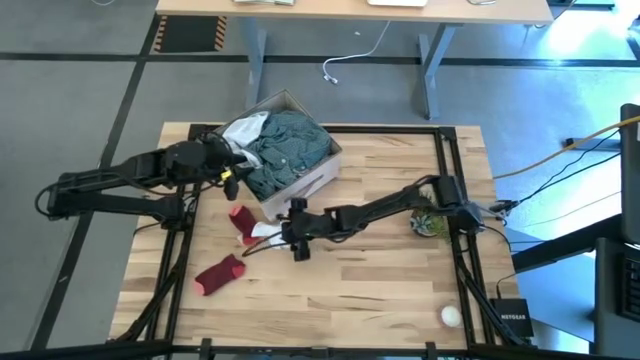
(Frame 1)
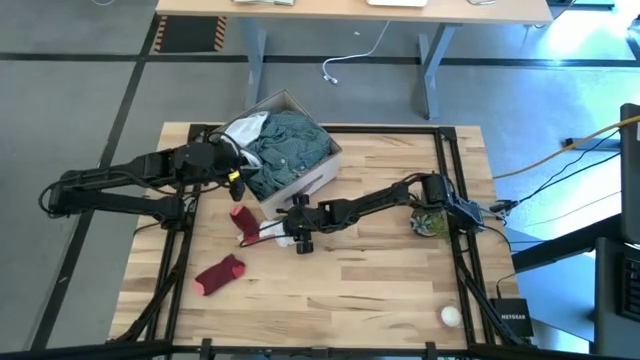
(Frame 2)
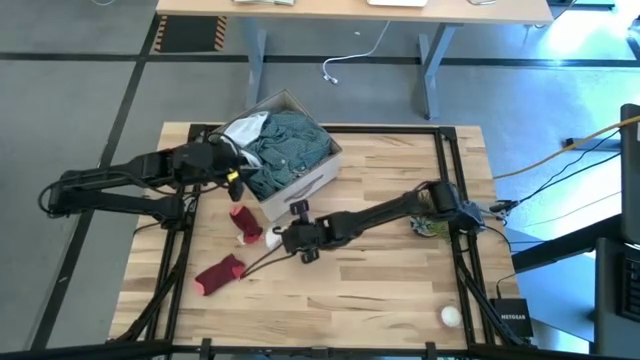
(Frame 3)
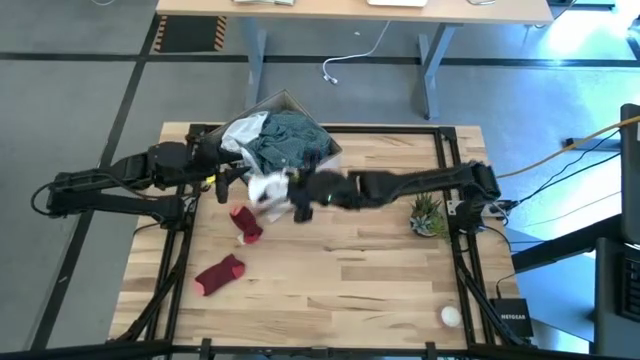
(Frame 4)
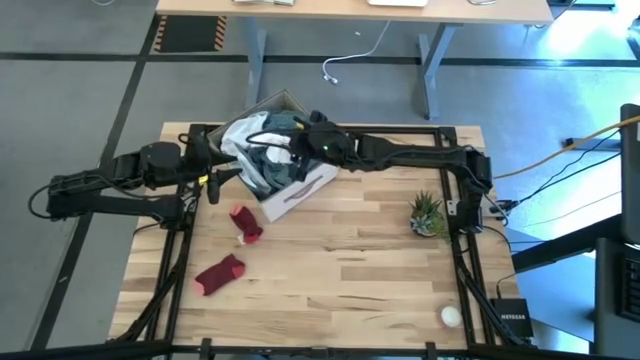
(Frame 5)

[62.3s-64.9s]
Task: Sort clothes
Put the white sock into the laundry organizer

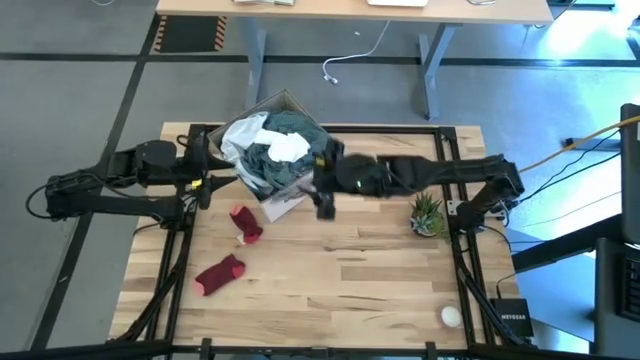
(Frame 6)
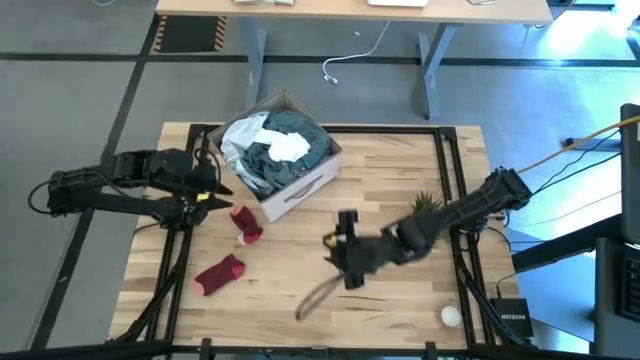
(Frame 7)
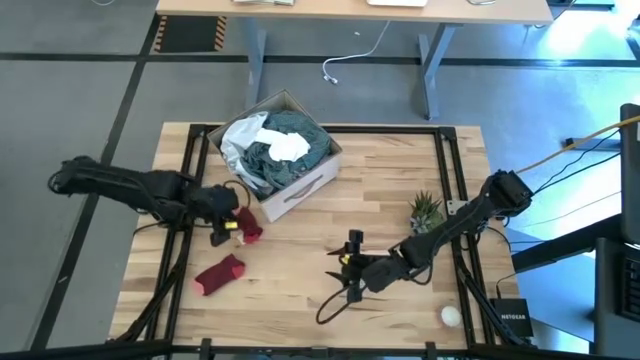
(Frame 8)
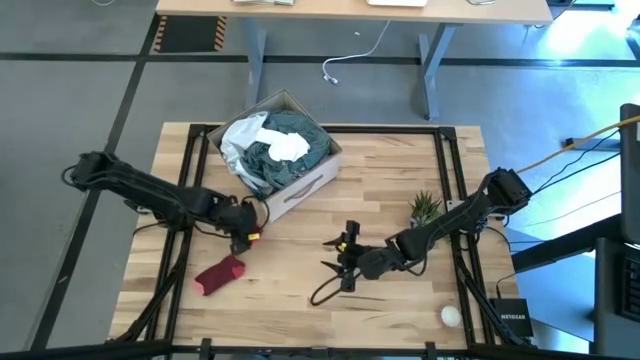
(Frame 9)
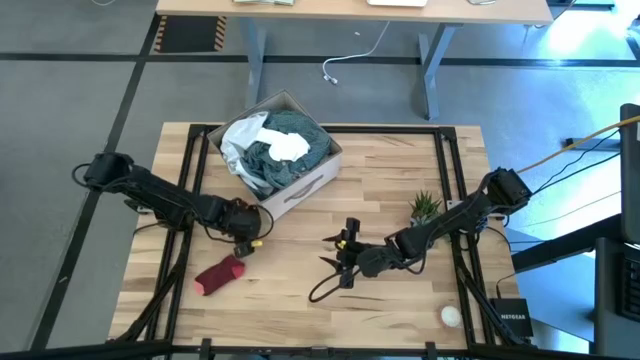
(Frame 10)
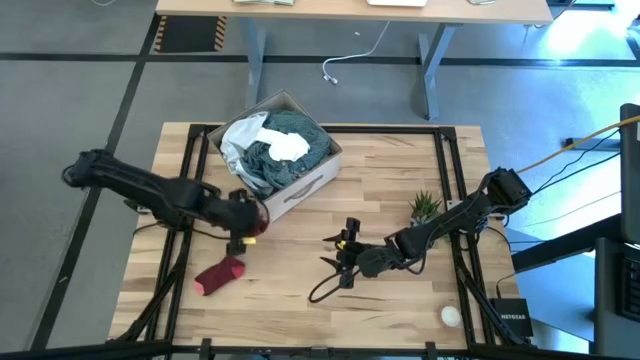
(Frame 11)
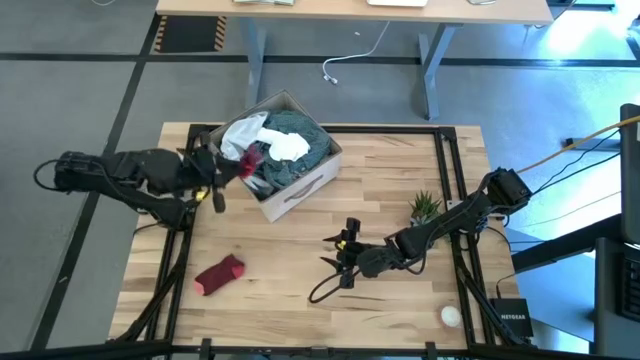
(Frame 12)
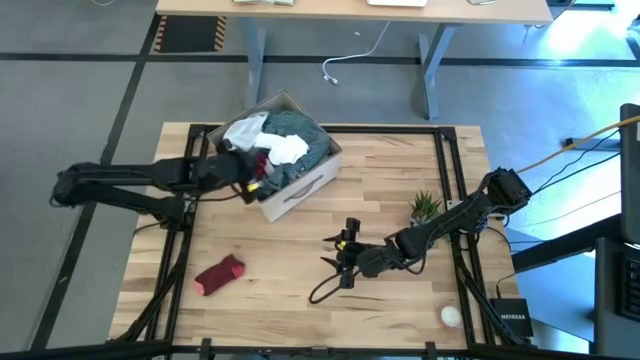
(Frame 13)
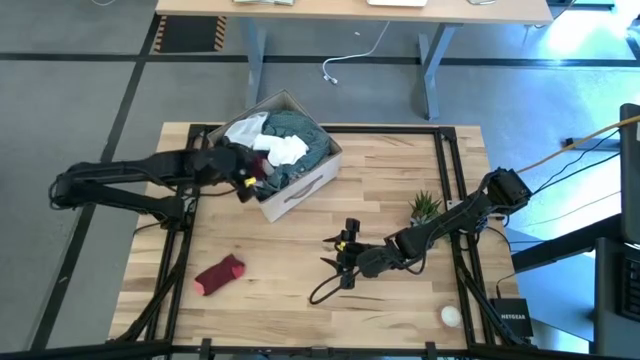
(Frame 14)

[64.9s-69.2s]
Put the top red sock into the laundry organizer

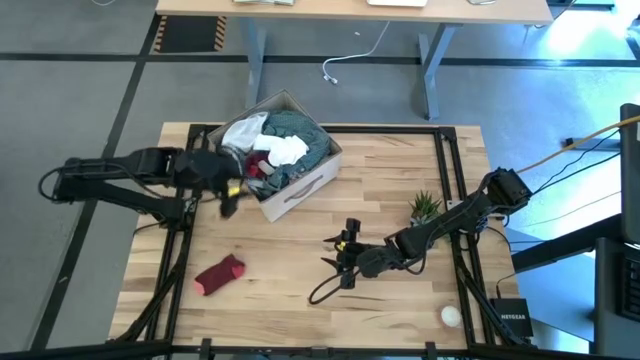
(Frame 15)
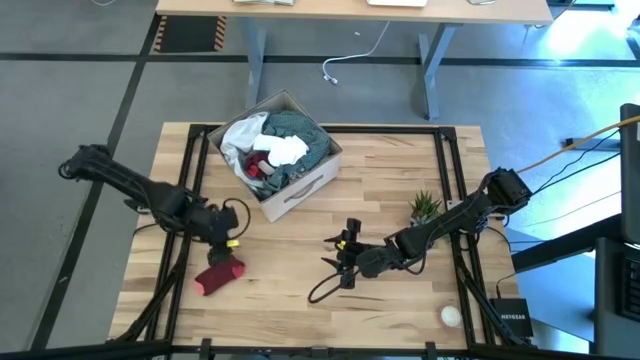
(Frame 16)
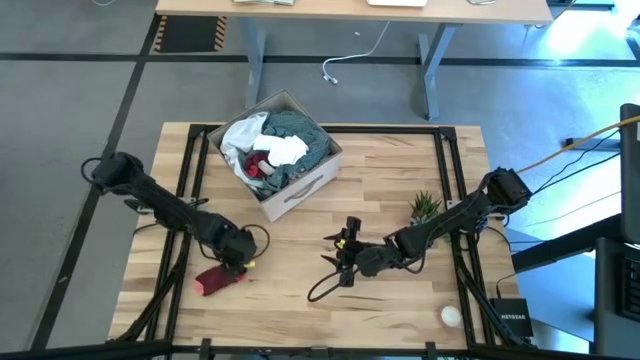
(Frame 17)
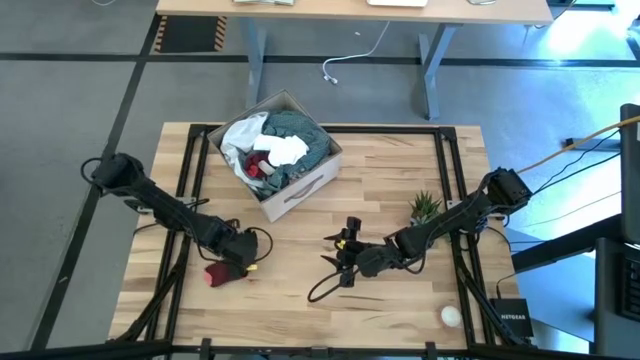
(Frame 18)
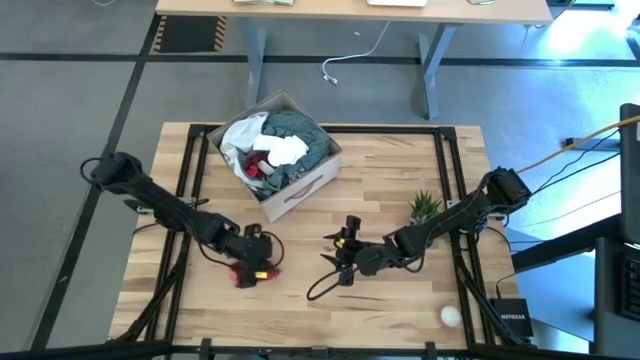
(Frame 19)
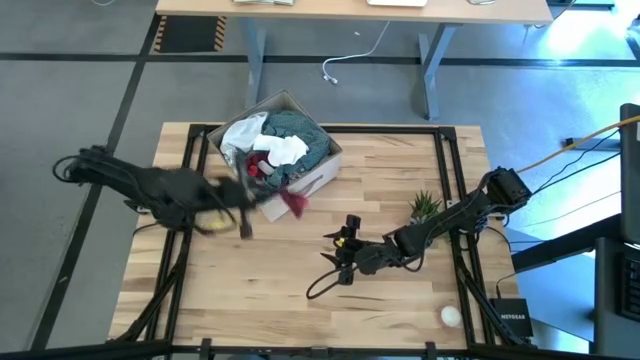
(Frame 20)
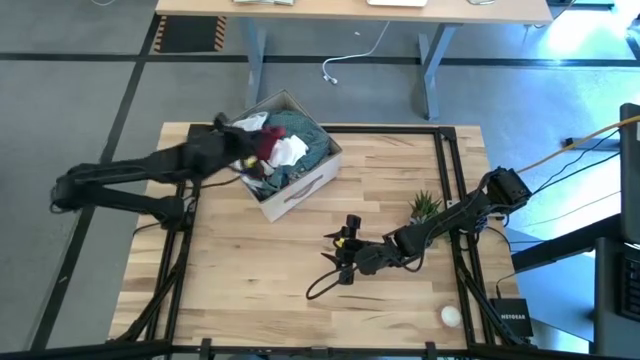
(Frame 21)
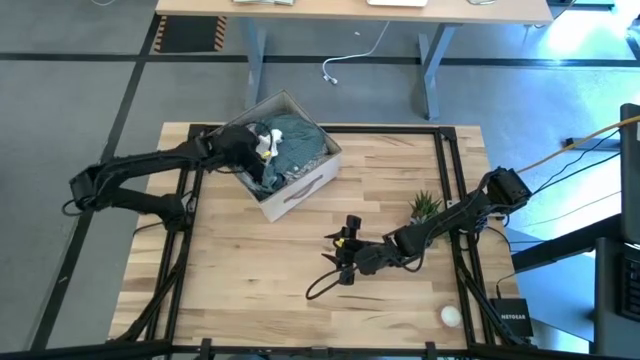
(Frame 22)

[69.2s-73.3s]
Put the red sock into the laundry organizer

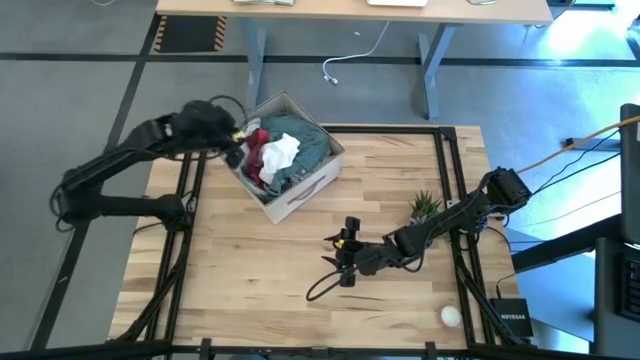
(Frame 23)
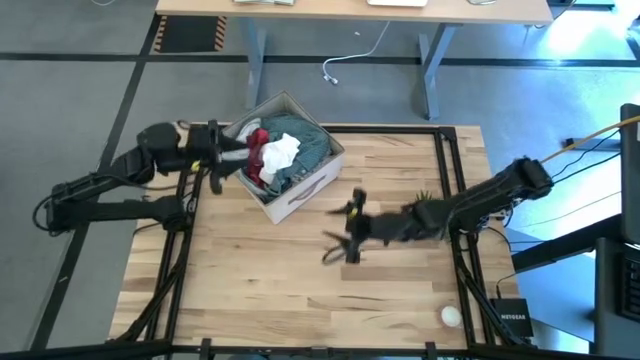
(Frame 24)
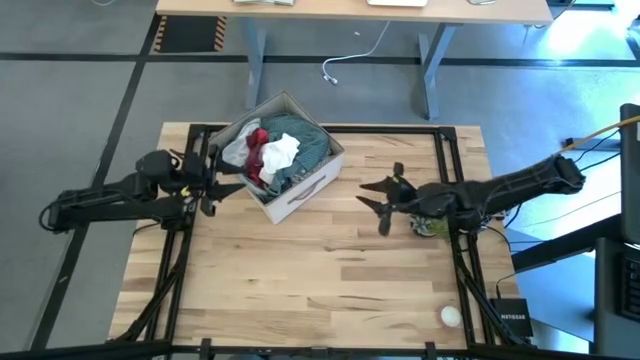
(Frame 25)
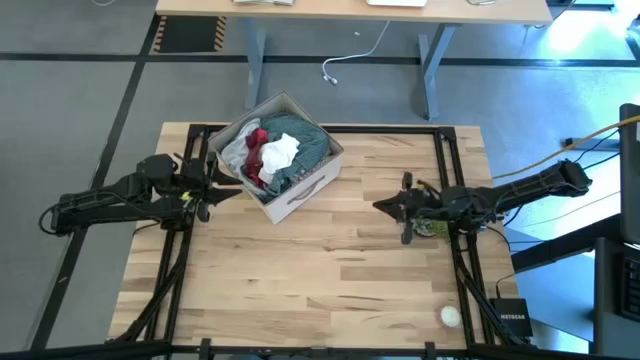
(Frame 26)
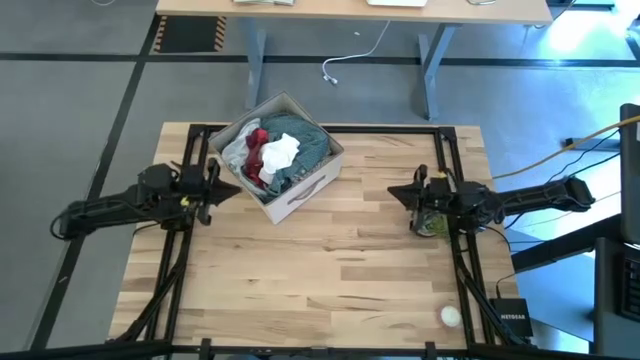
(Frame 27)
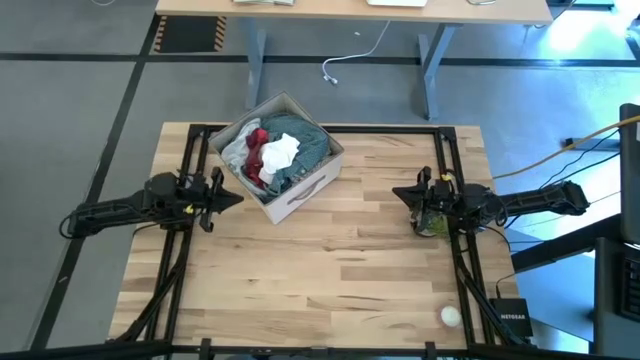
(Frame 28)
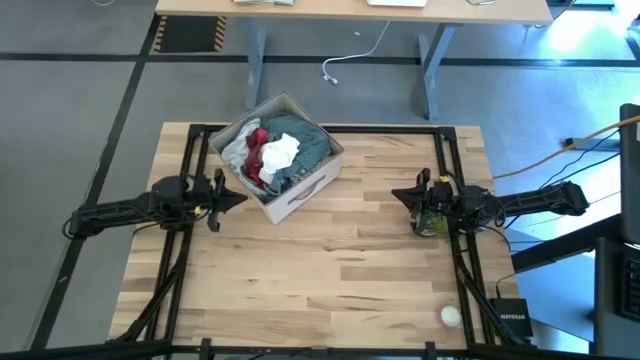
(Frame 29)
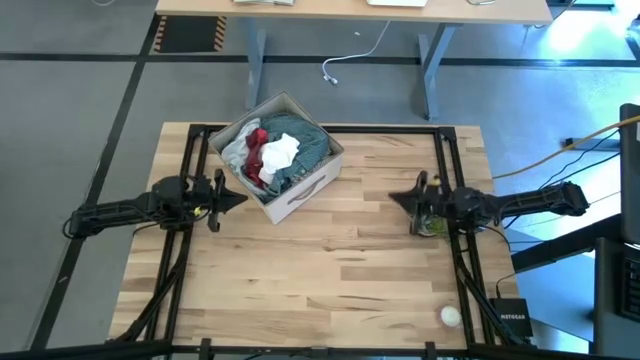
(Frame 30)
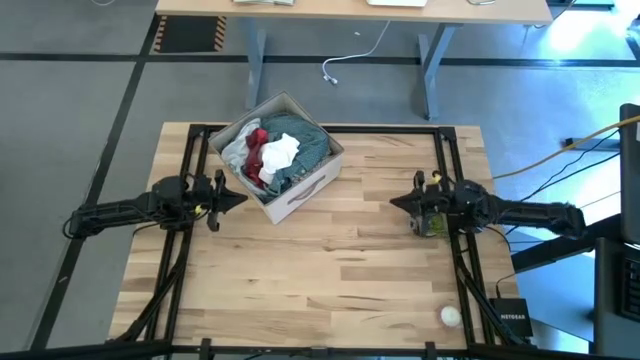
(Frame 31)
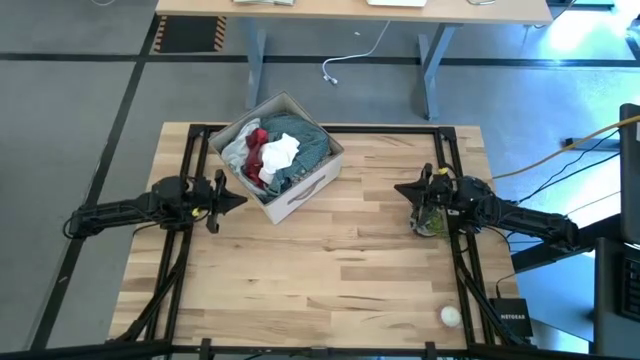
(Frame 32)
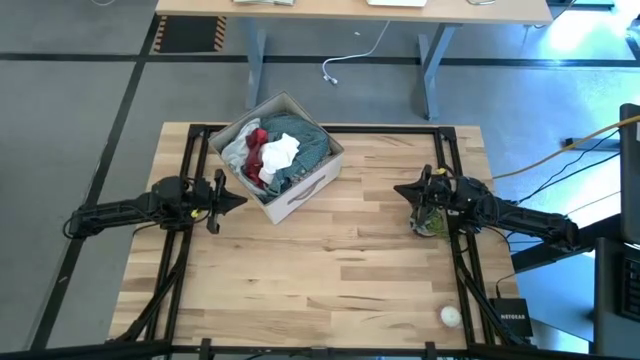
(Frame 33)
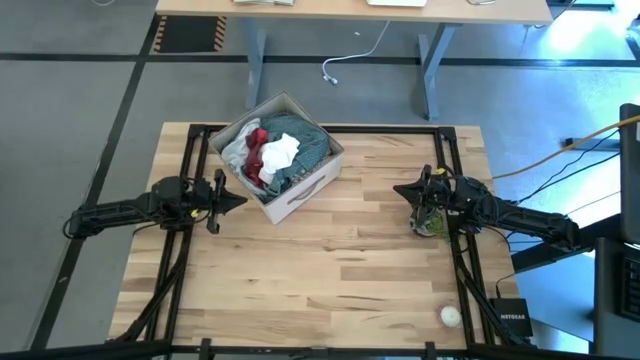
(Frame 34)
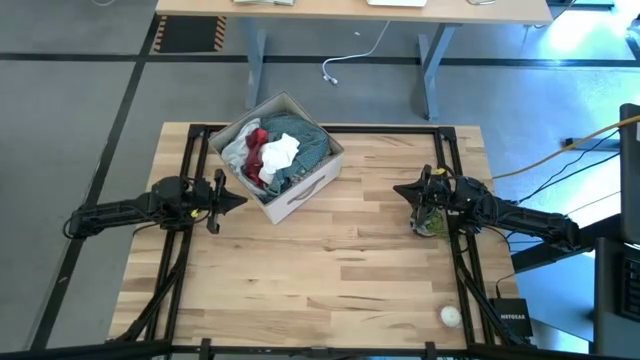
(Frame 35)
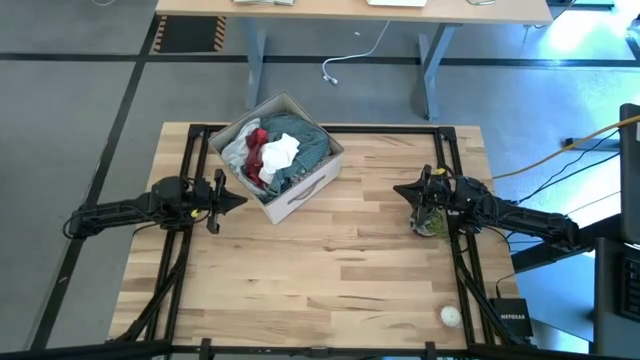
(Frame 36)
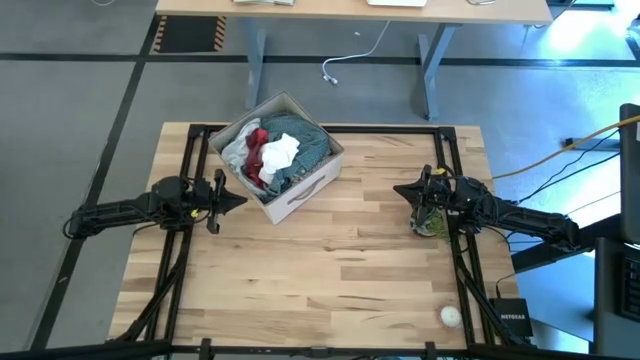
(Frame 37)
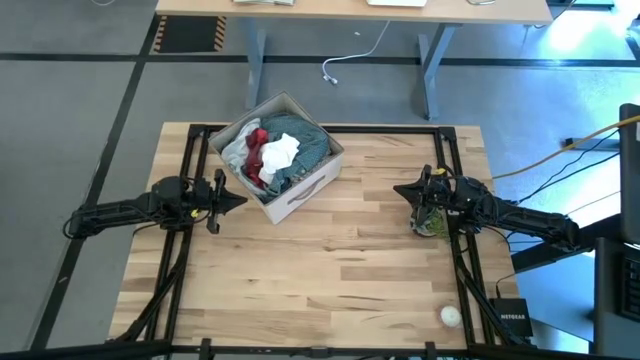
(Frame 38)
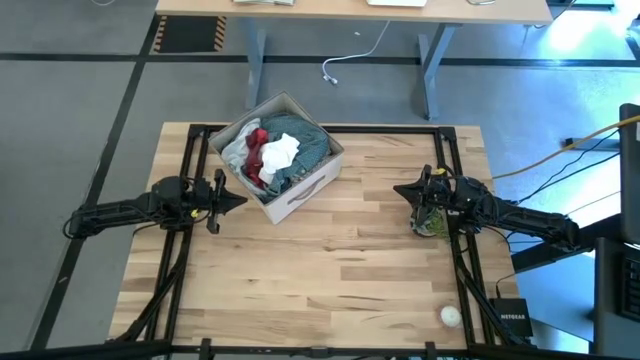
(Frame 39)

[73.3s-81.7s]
Return to Home Position

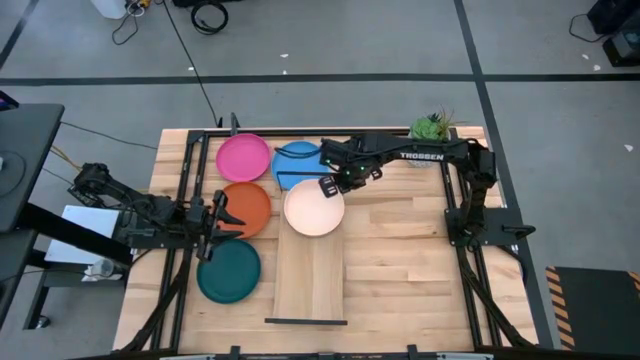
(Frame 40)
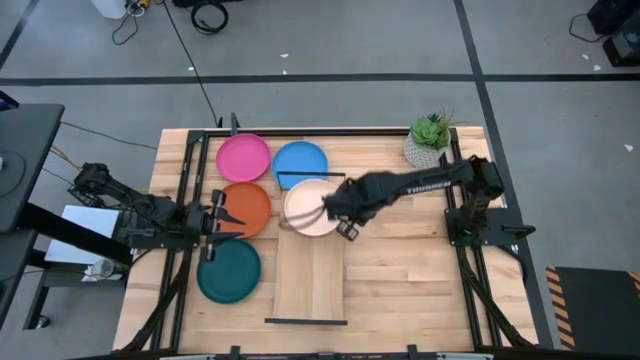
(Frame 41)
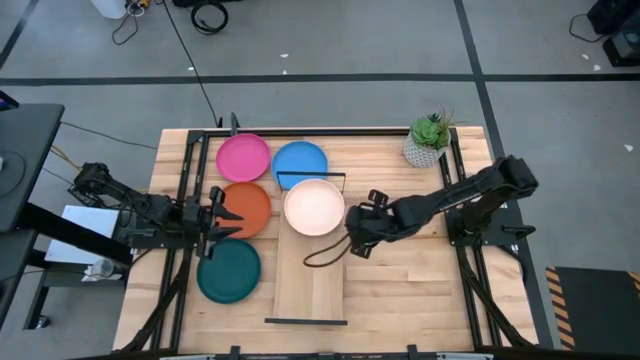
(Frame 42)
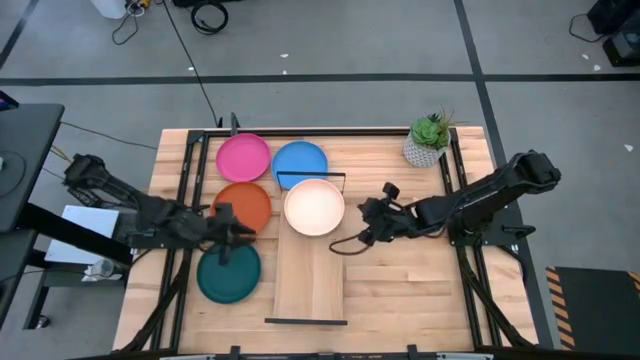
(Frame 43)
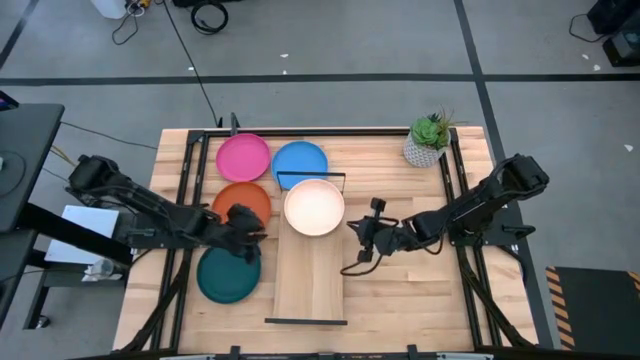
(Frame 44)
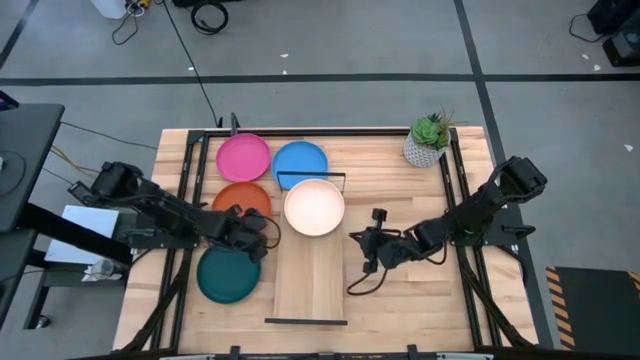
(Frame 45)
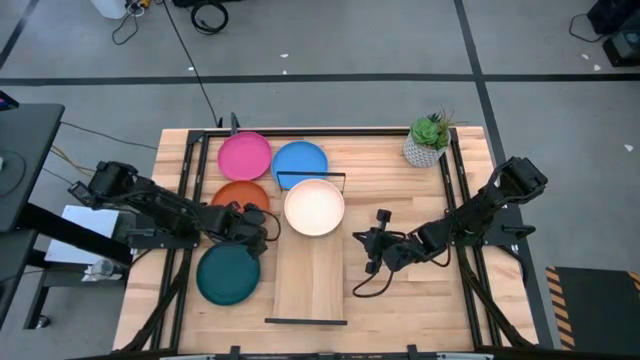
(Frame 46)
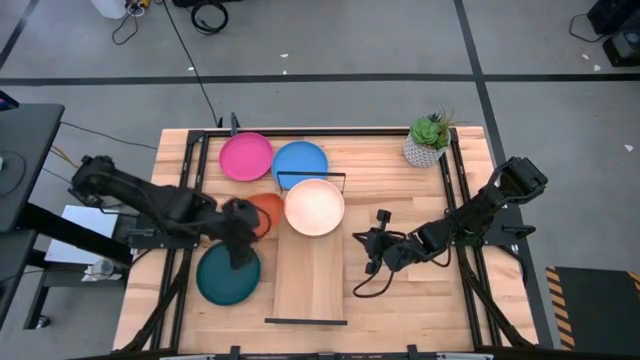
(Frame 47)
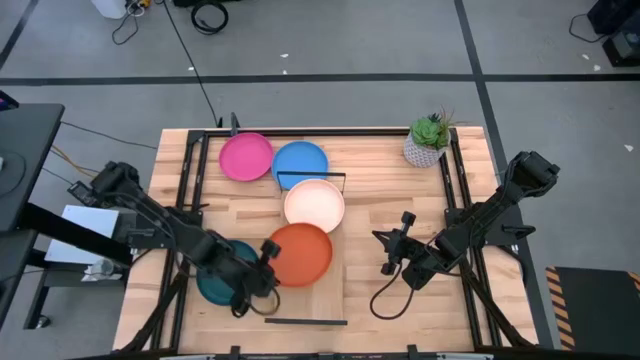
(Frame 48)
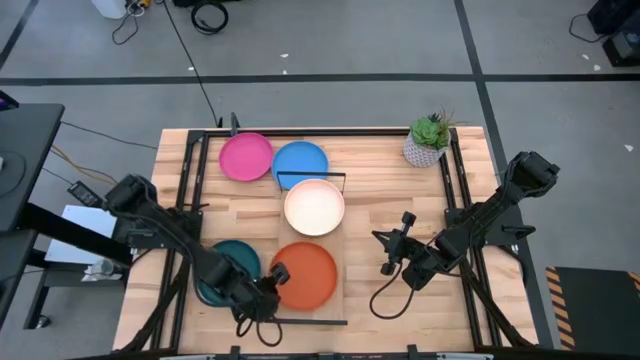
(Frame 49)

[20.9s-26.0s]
Task: Place and stack plates onto a shelf
Put the orange plate on the shelf
